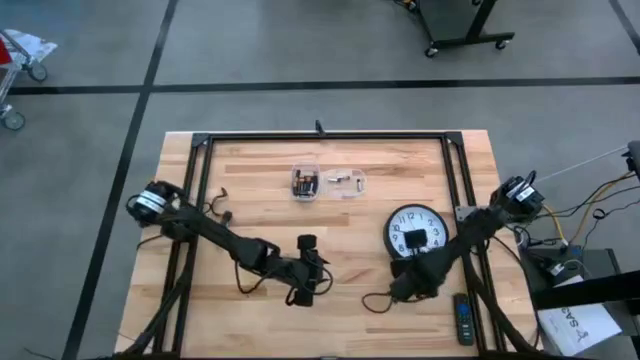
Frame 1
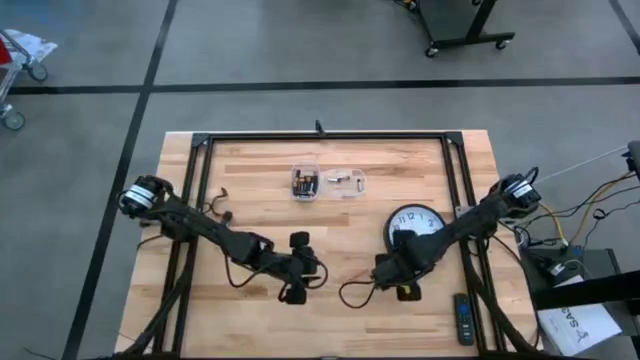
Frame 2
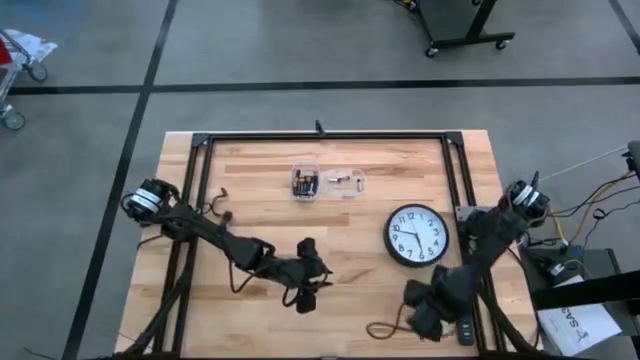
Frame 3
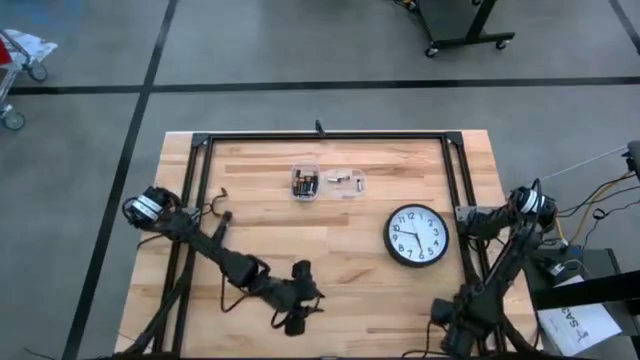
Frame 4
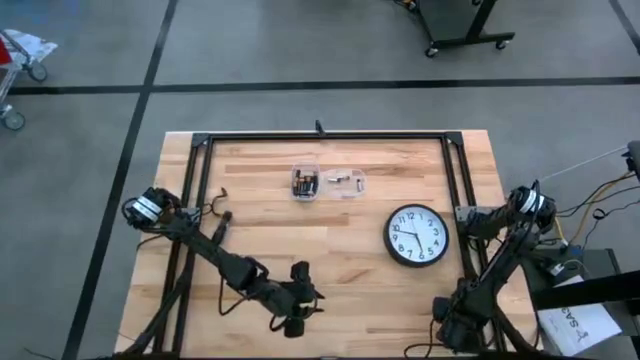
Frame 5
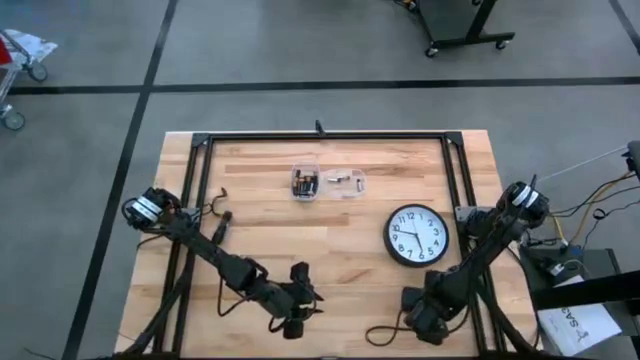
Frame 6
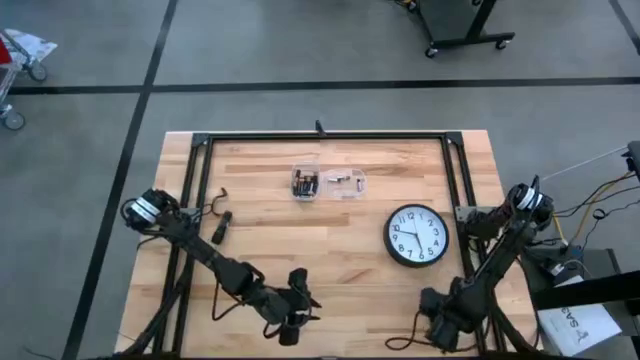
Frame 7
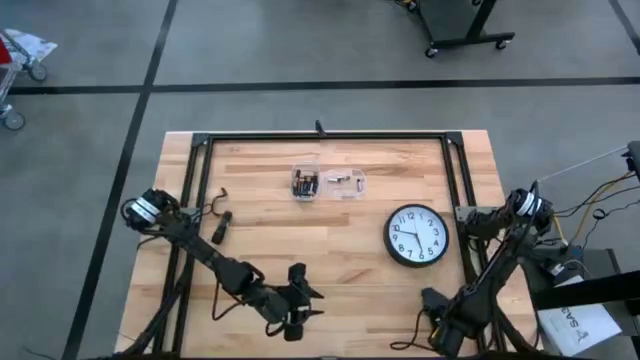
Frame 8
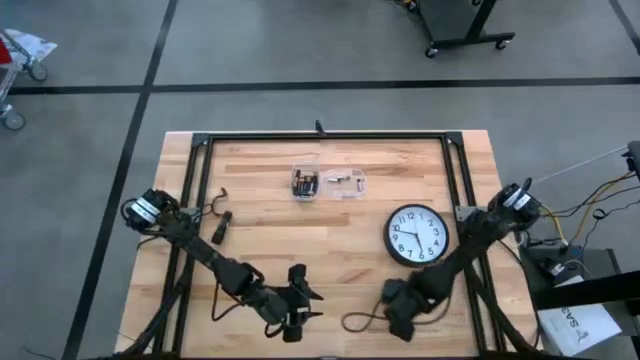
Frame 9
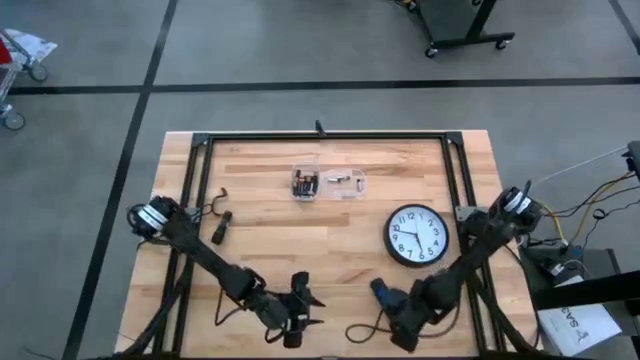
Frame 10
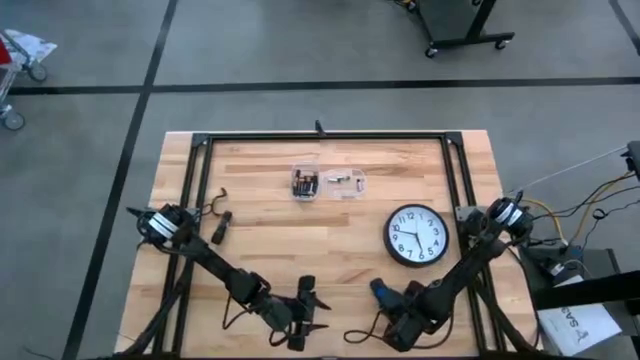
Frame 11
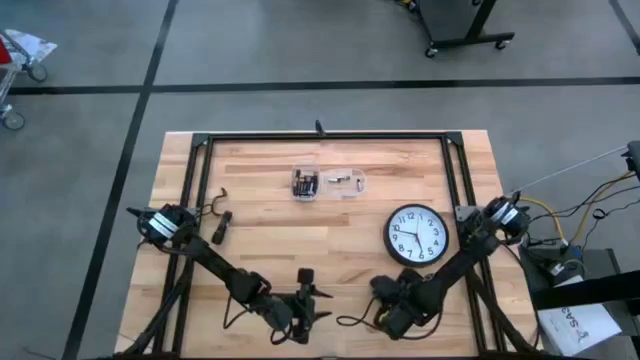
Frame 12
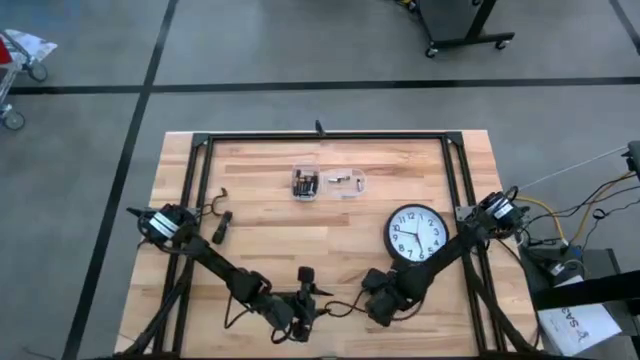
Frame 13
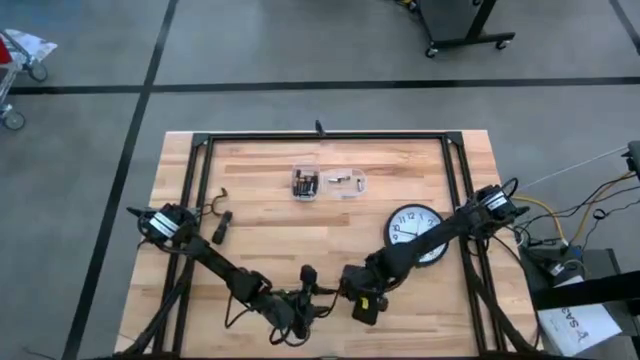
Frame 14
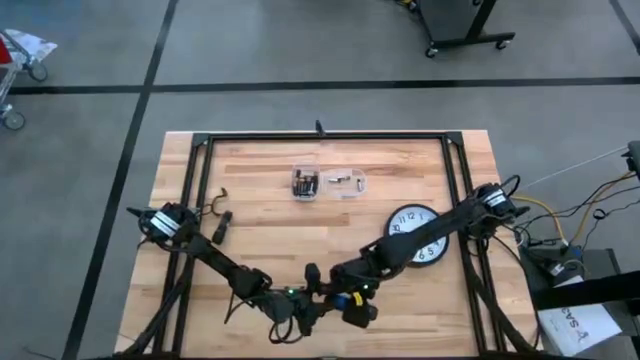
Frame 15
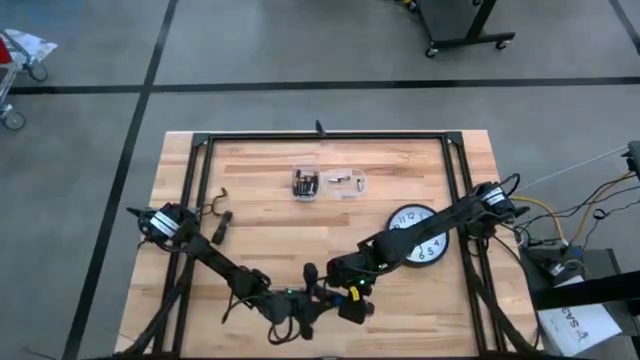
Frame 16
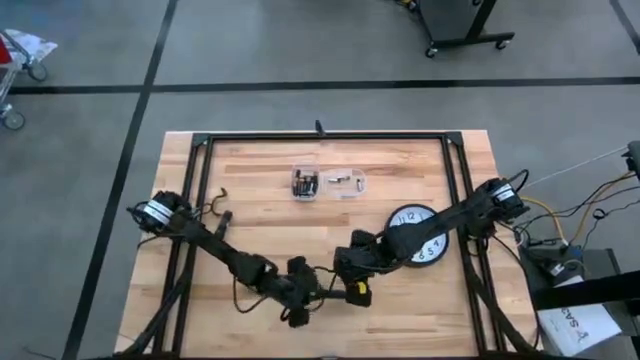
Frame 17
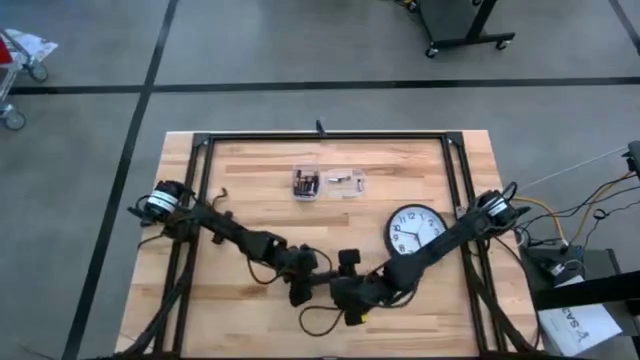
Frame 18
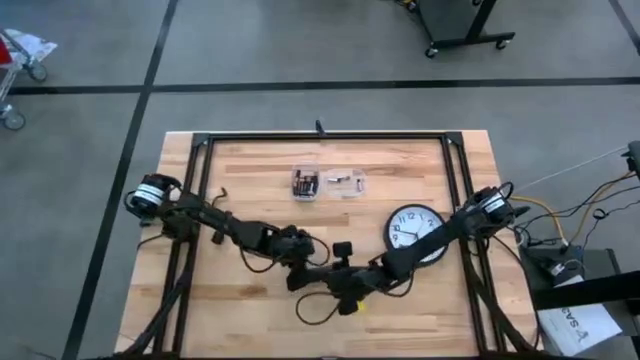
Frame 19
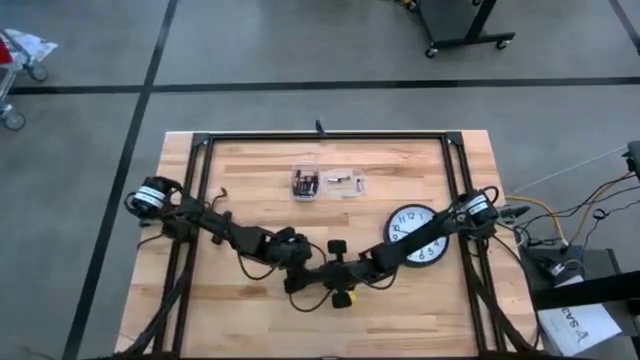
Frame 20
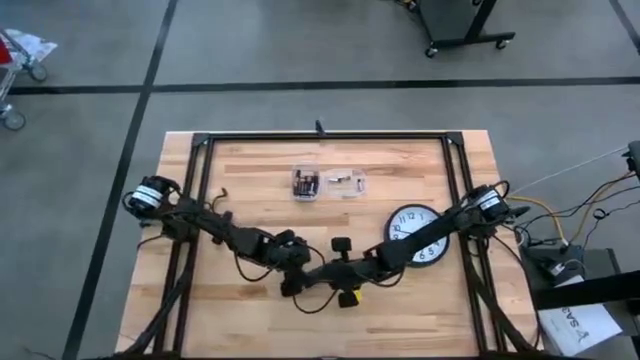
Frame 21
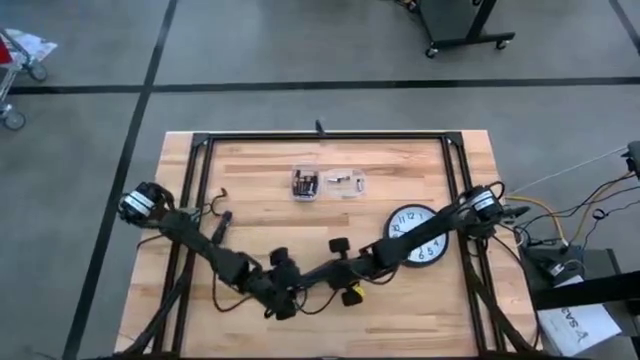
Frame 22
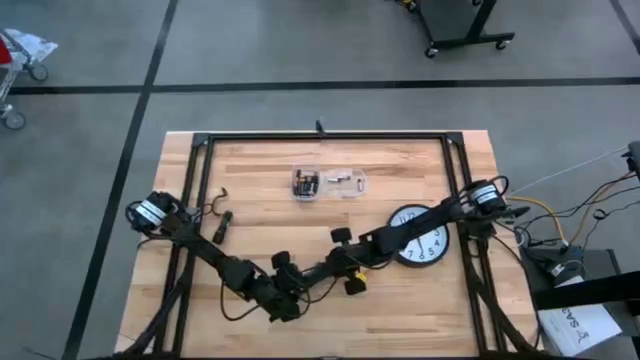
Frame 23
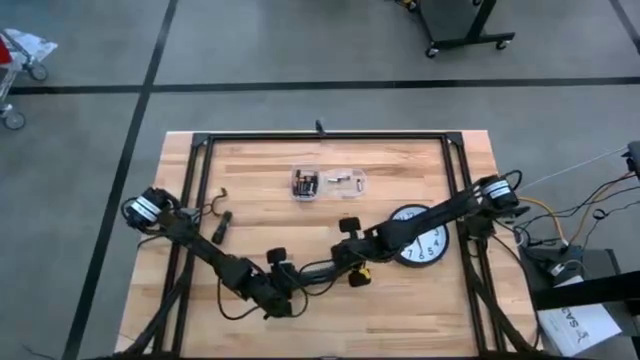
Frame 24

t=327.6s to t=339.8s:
Task: Insert battery
Open the black remote battery cover

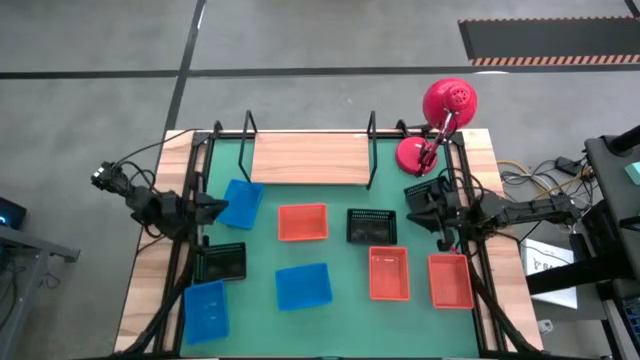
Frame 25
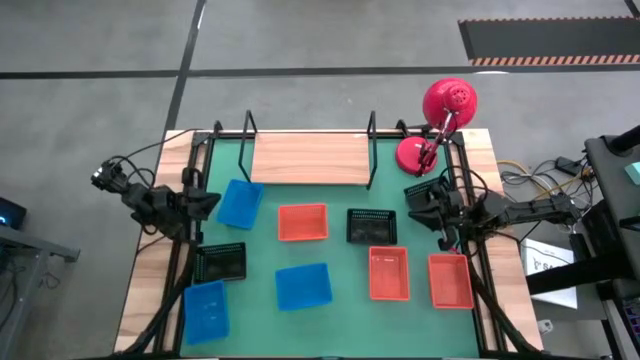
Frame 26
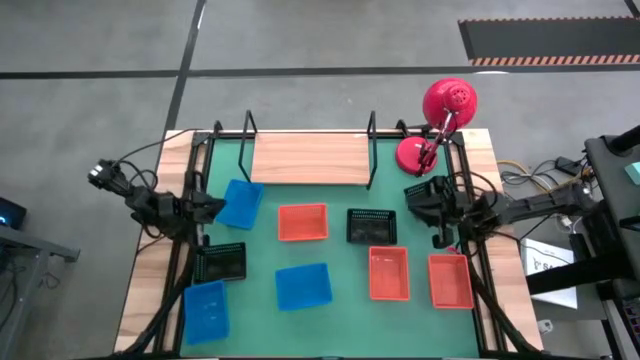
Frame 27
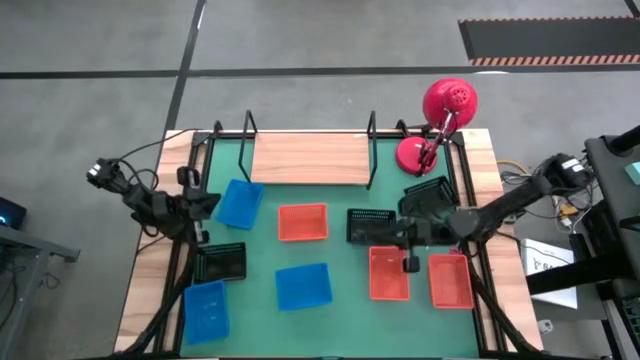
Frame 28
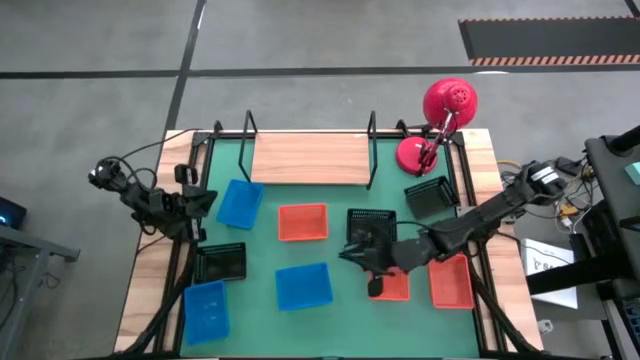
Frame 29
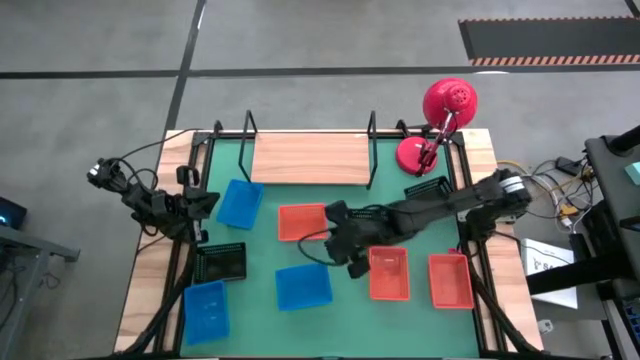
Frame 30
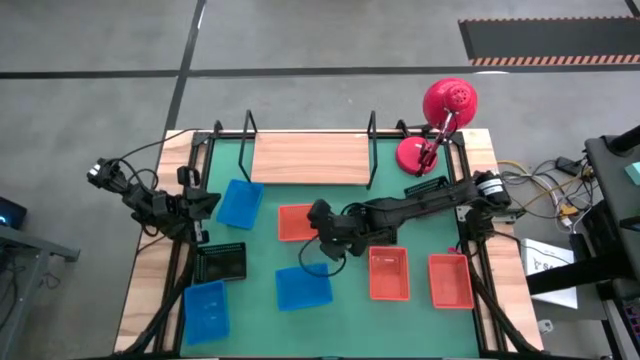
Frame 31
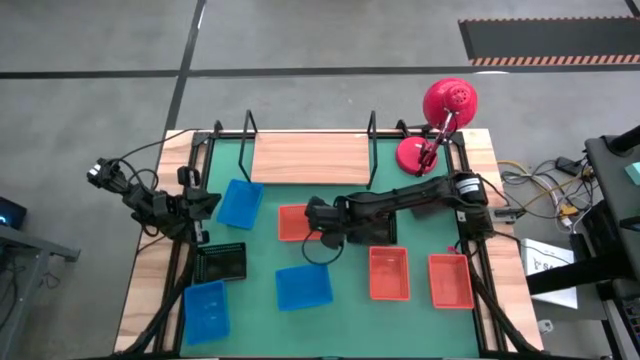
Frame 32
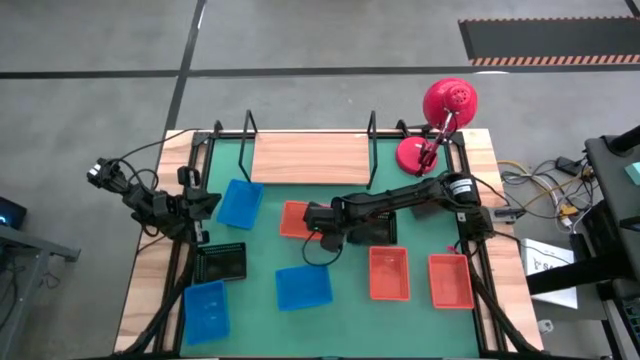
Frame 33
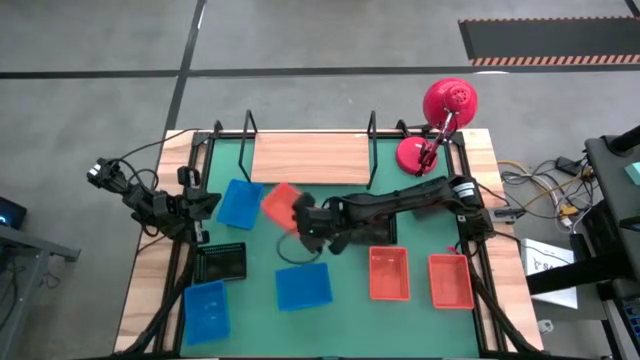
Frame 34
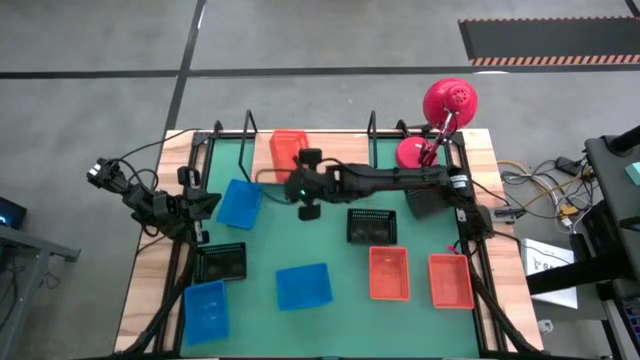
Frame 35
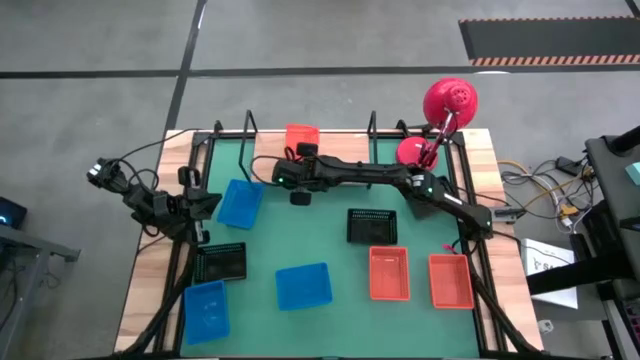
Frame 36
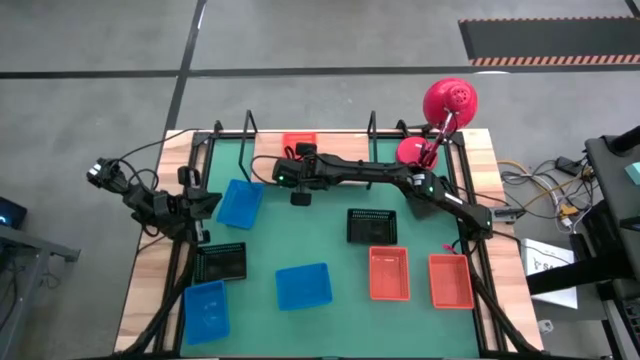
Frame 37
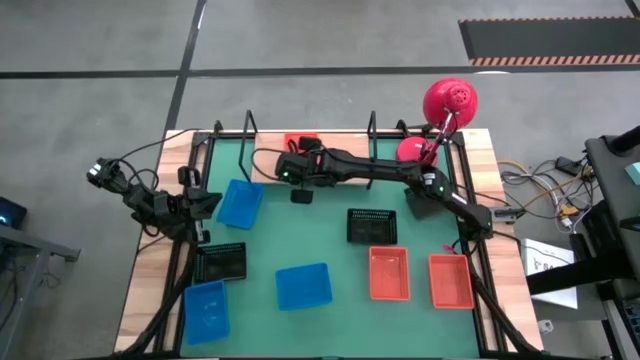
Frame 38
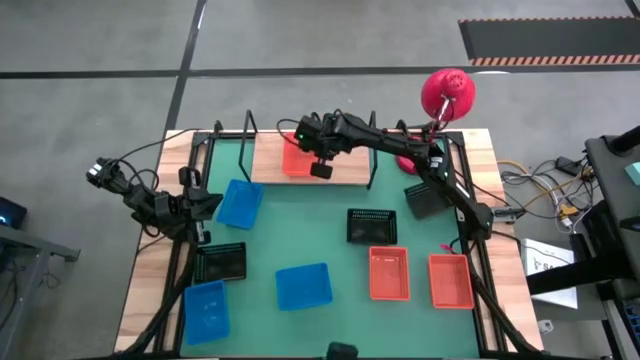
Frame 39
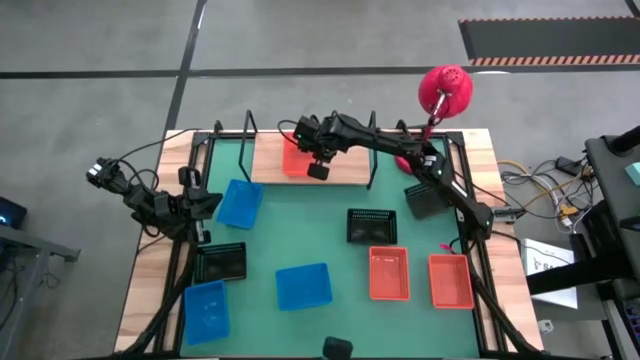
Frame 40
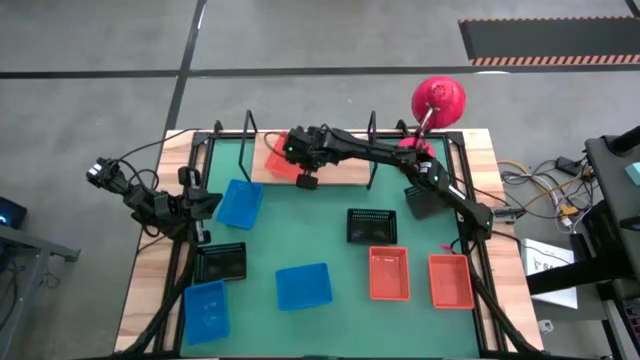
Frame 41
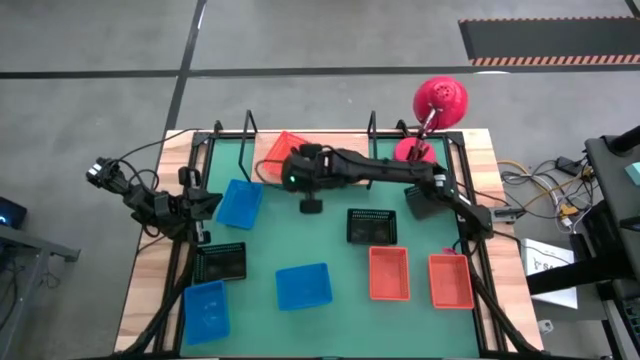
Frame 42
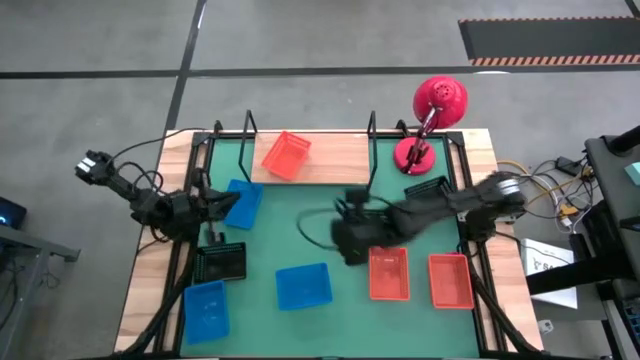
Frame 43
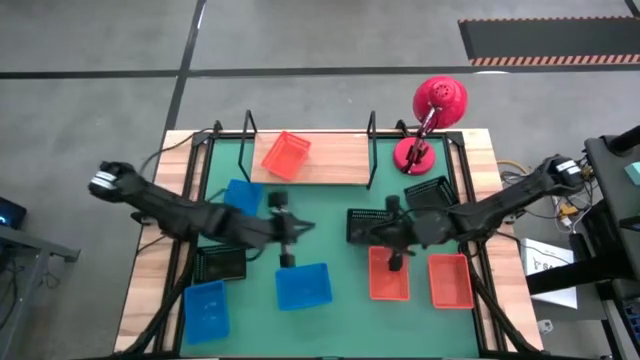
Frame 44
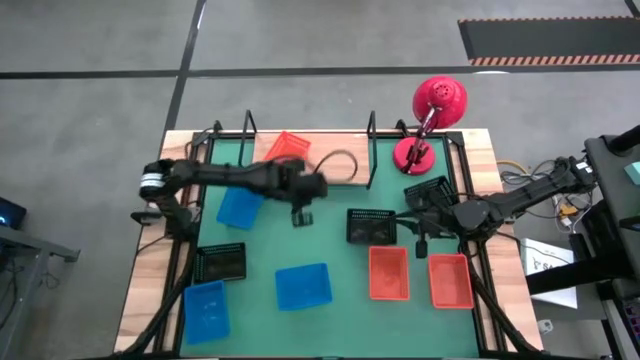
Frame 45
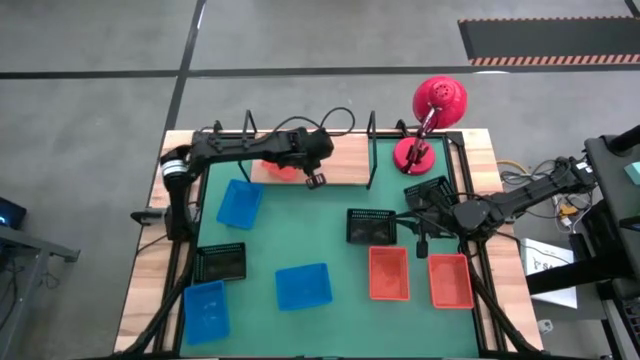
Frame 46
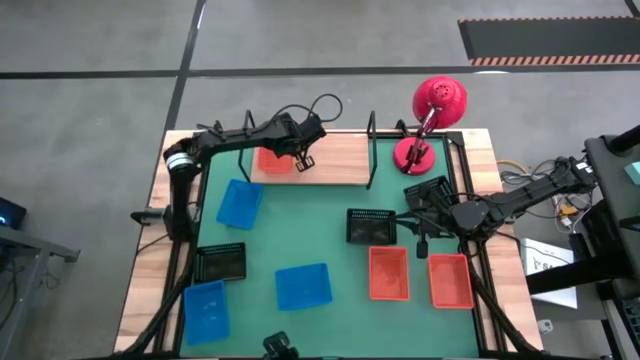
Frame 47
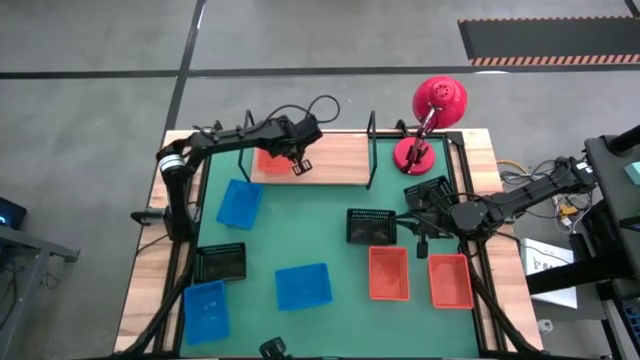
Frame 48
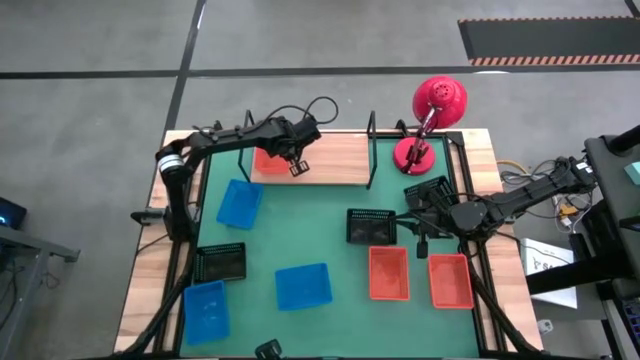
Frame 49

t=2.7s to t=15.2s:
Task: Stack baskets on shelf by color
Put the left orange basket on the shelf
